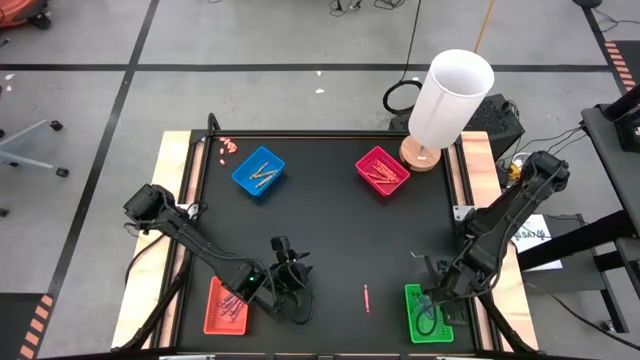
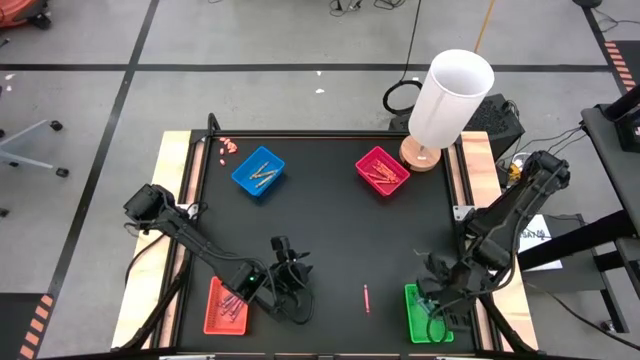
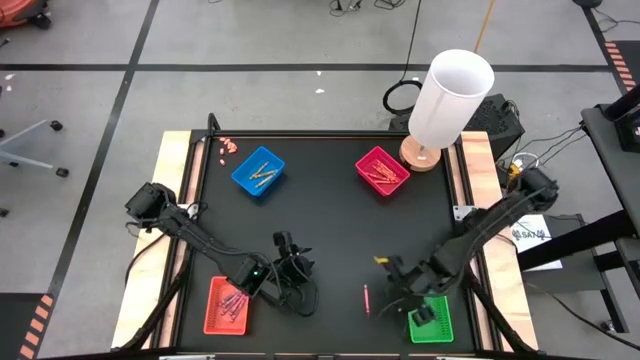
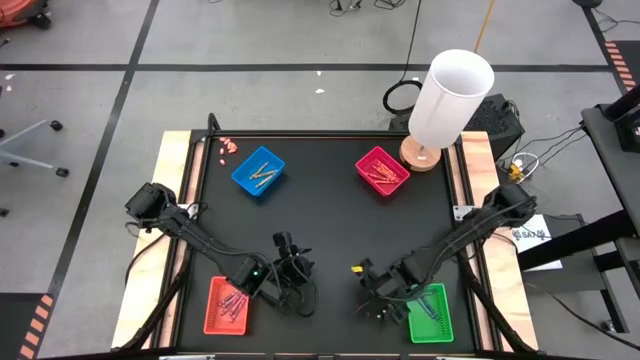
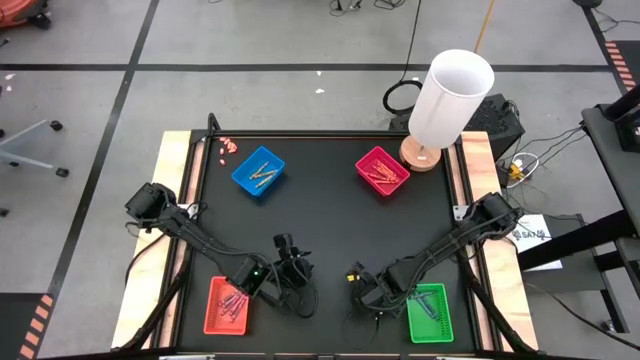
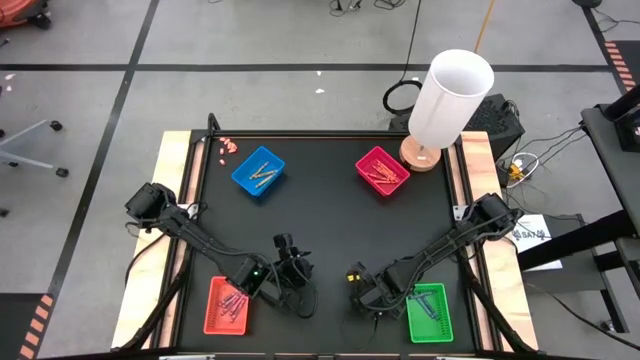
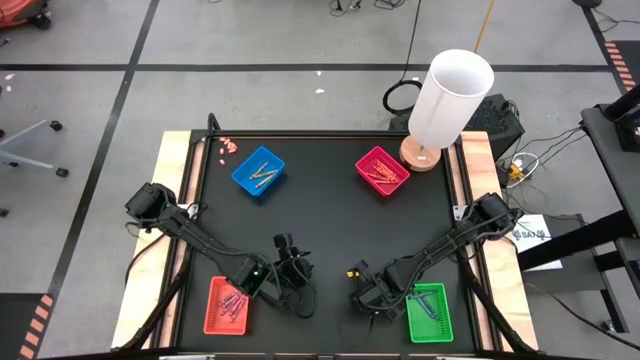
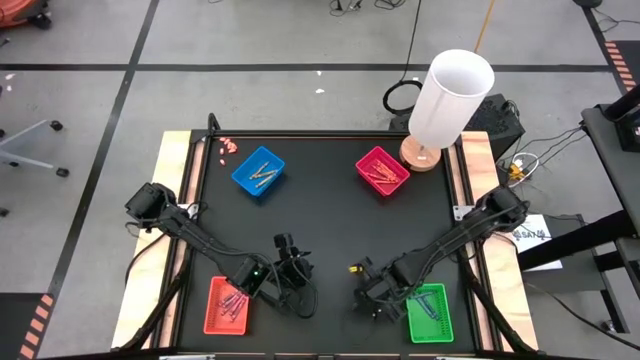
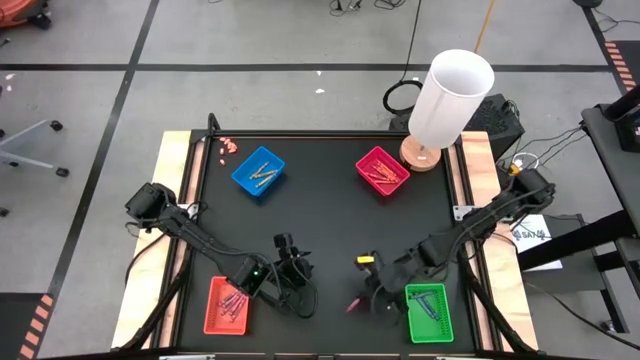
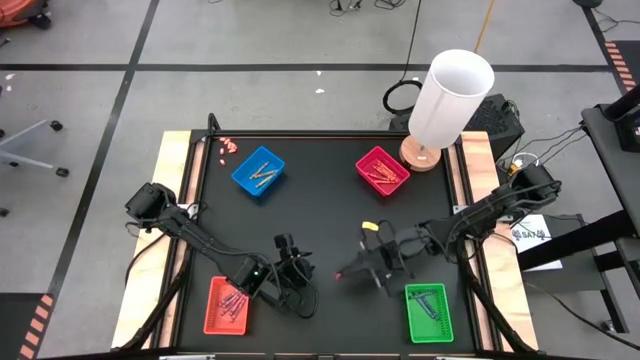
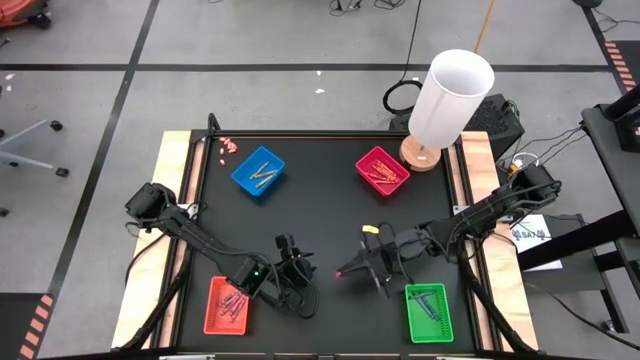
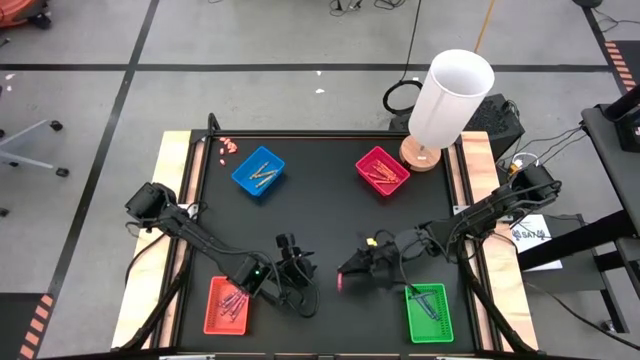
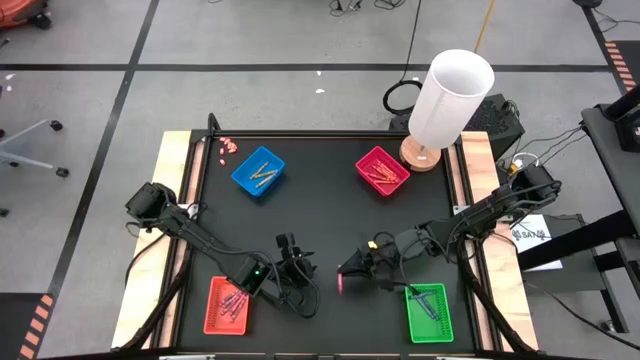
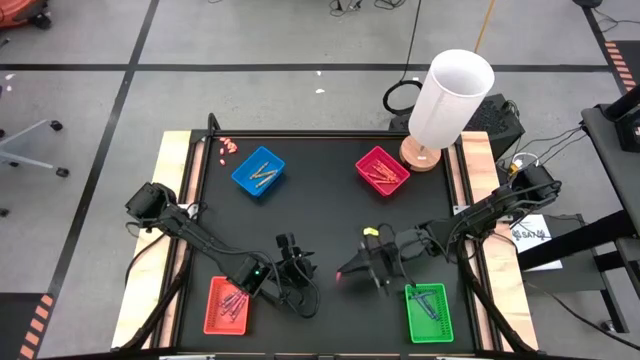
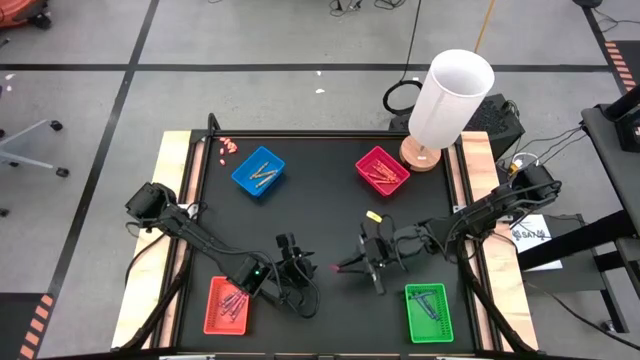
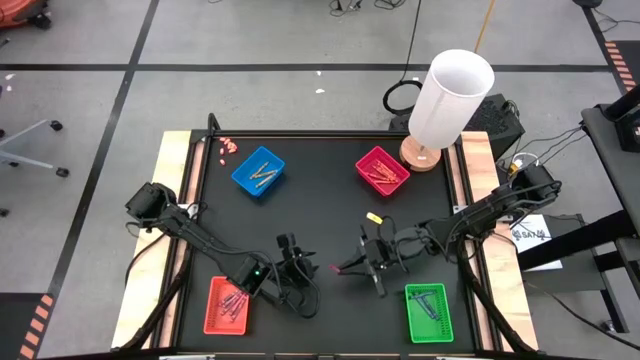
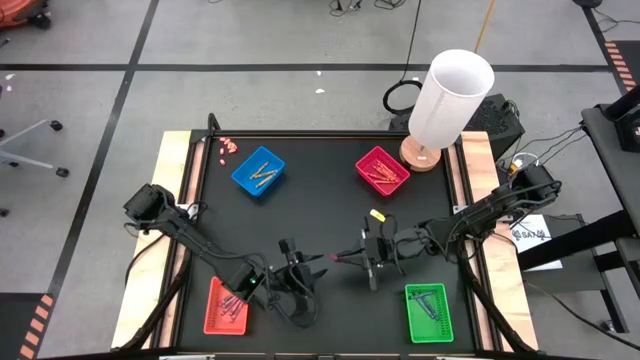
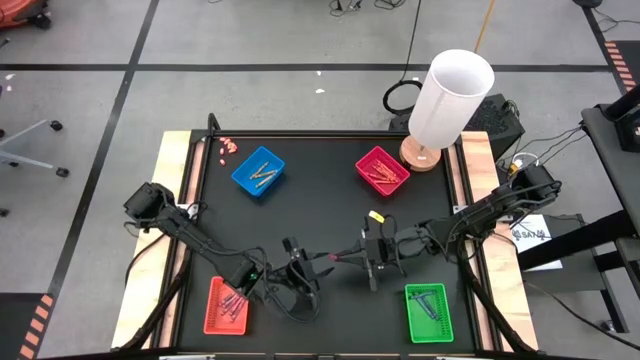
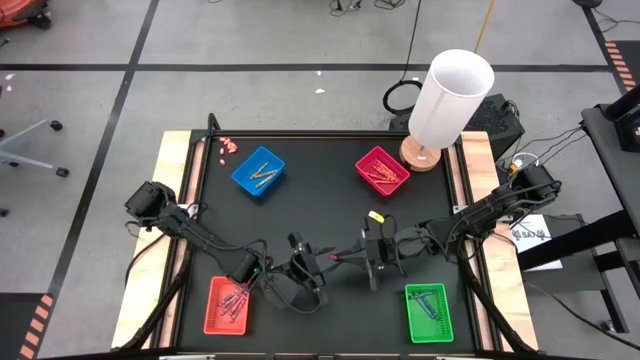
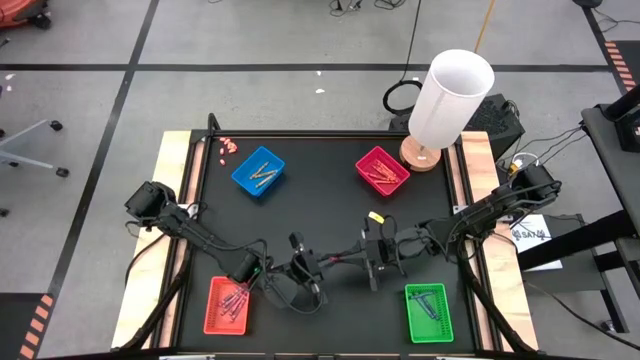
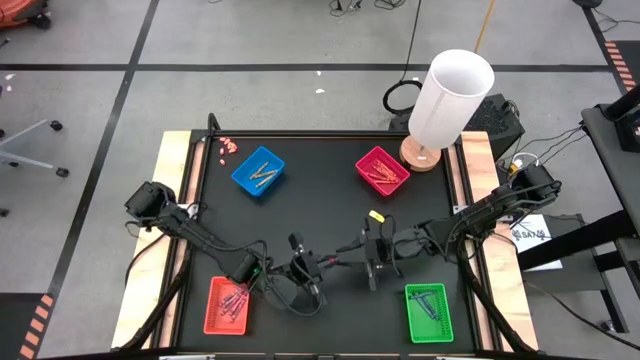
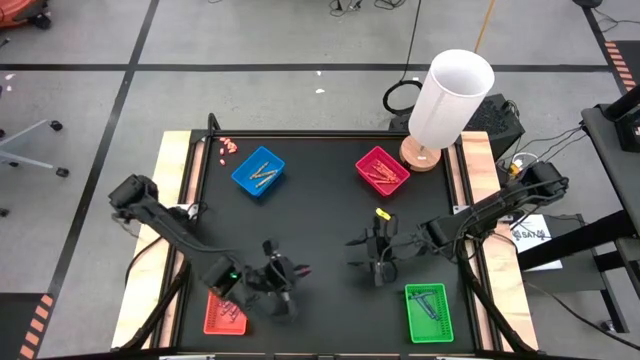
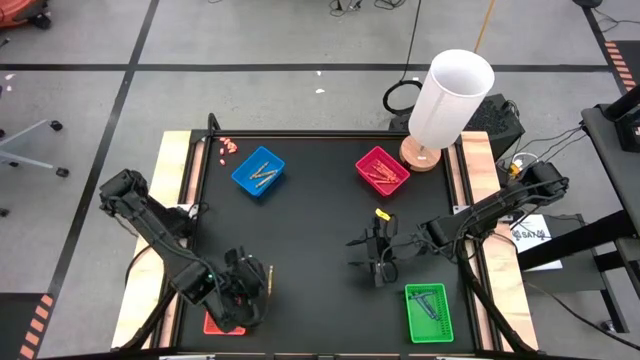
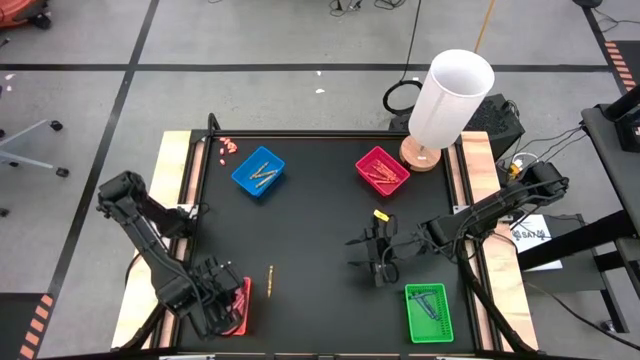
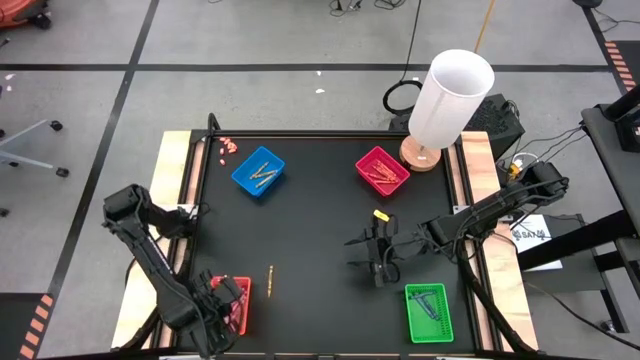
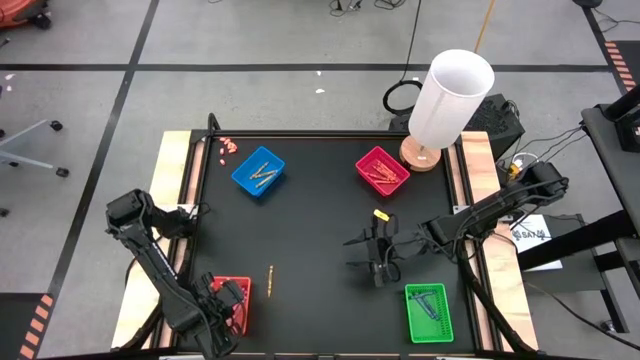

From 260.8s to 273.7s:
Task: Sort crayons
Put the red crayon into the orange bin

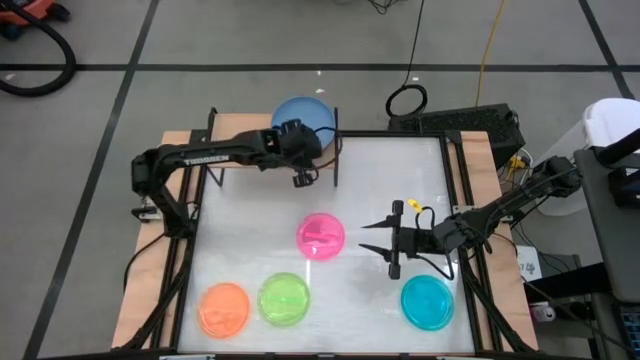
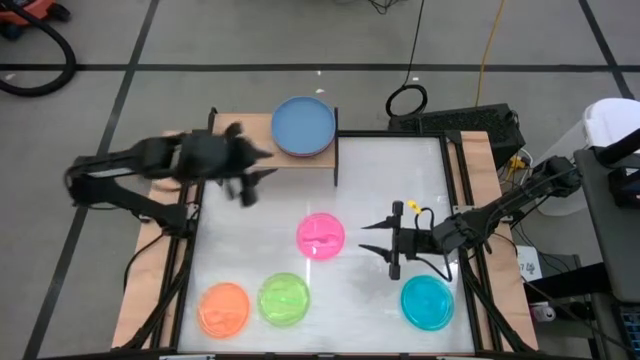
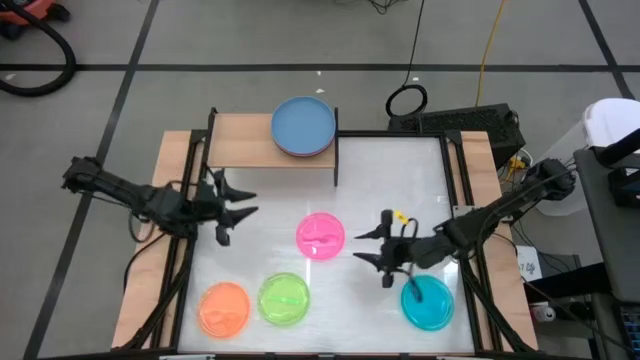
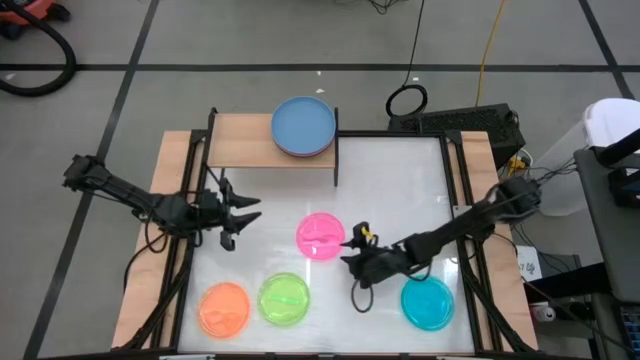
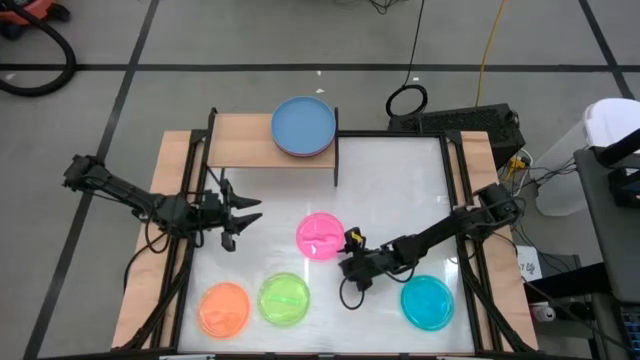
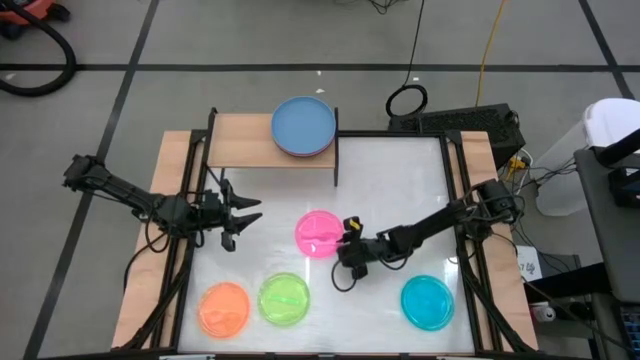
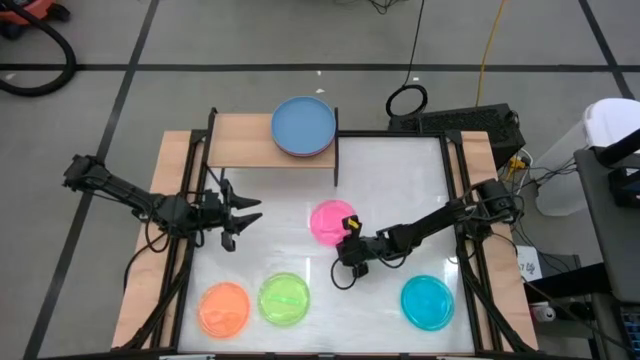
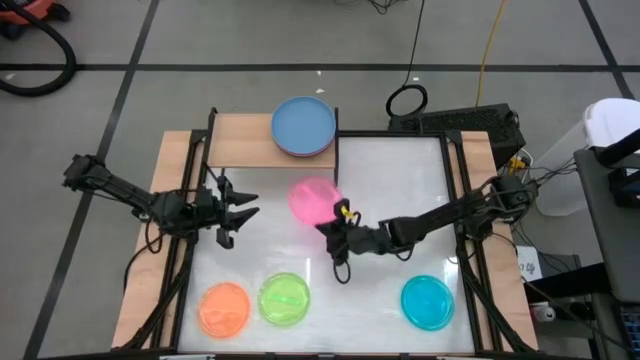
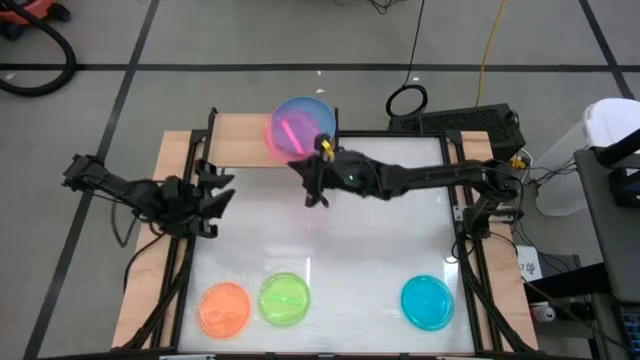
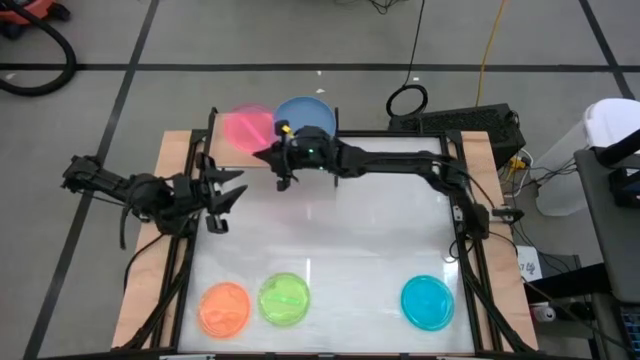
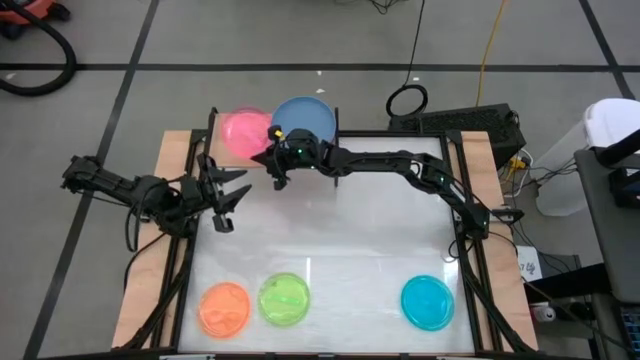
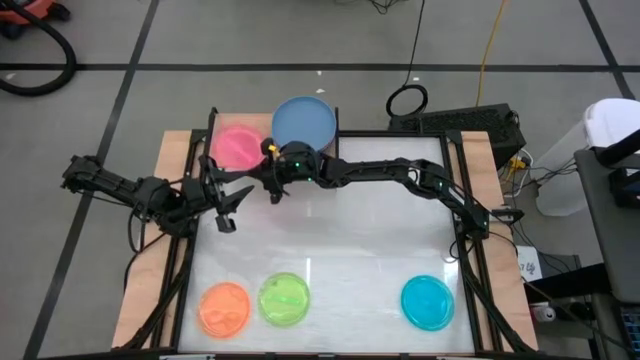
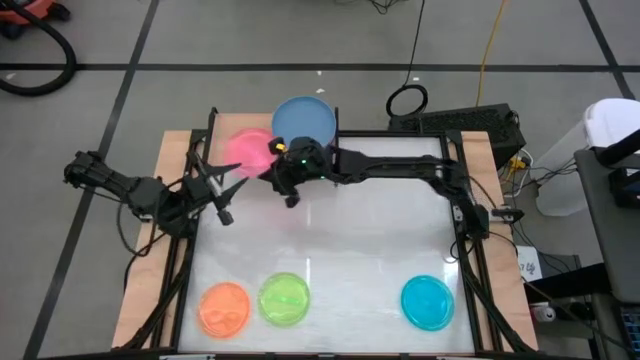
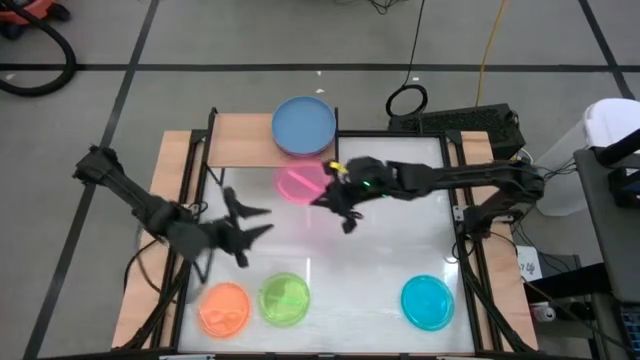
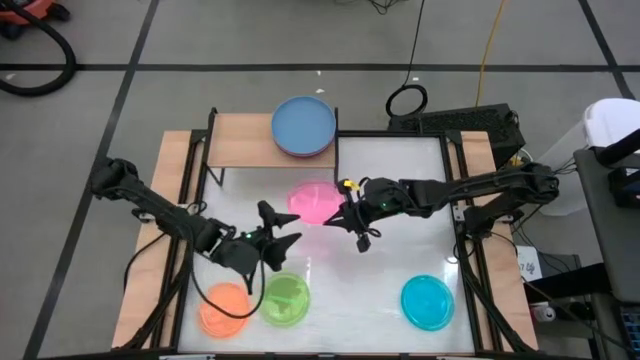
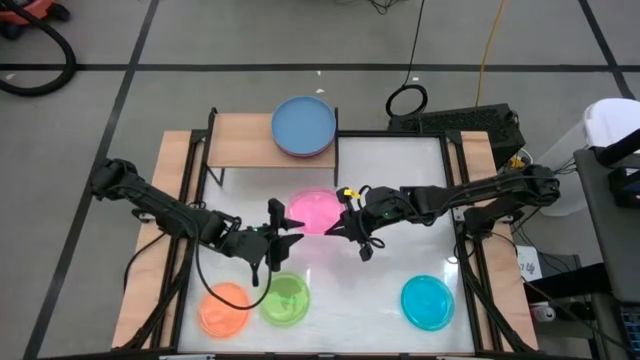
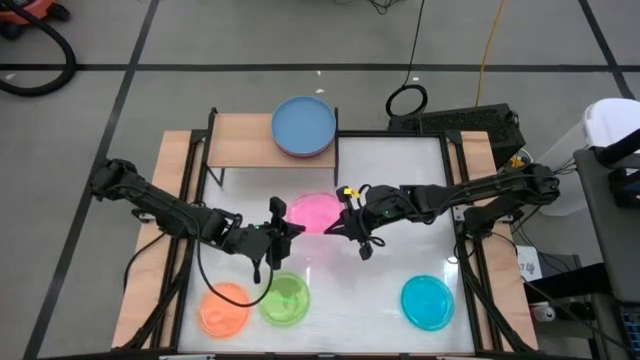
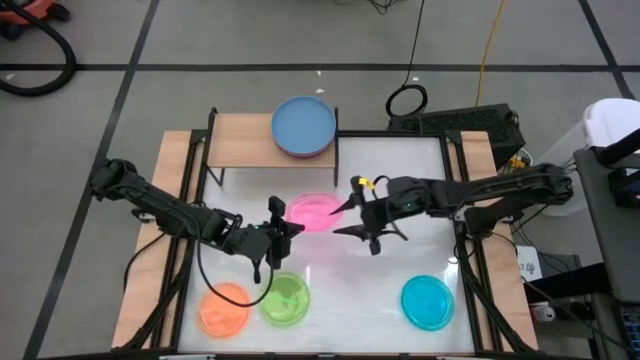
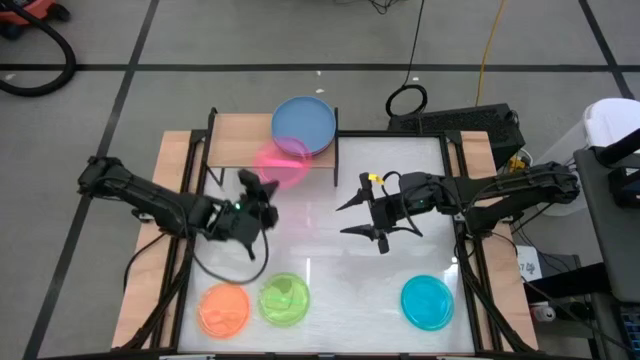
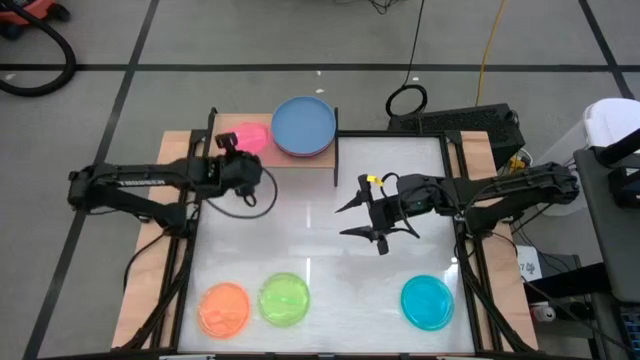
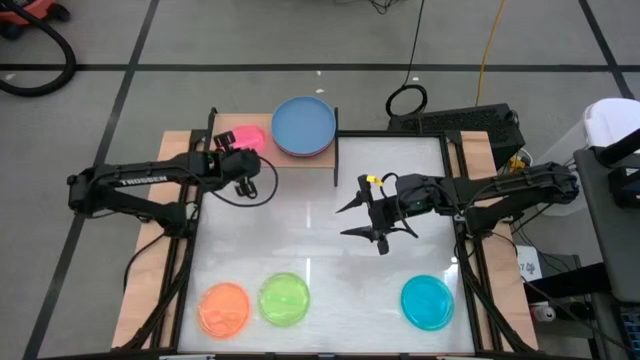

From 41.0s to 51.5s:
Task: Place and stack plates onto a shelf
Put the transparent pink plate on the shelf
